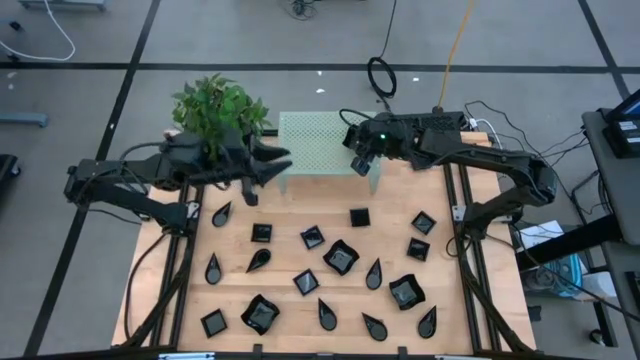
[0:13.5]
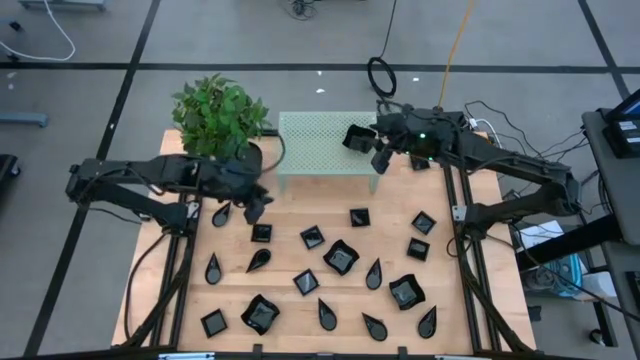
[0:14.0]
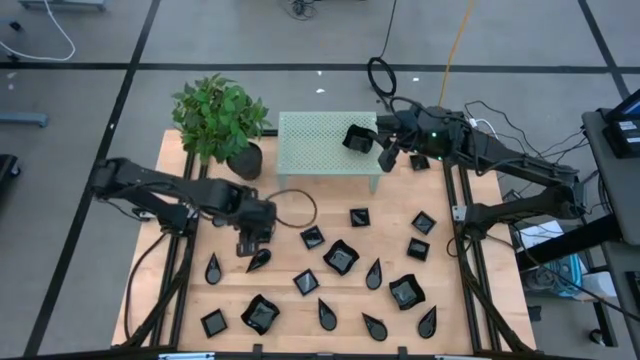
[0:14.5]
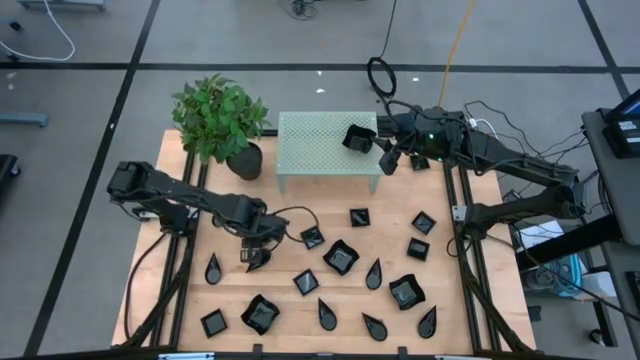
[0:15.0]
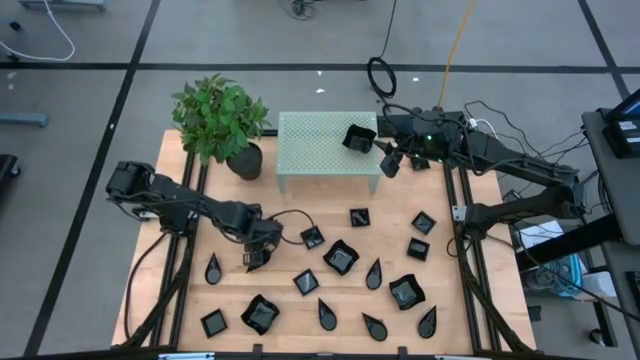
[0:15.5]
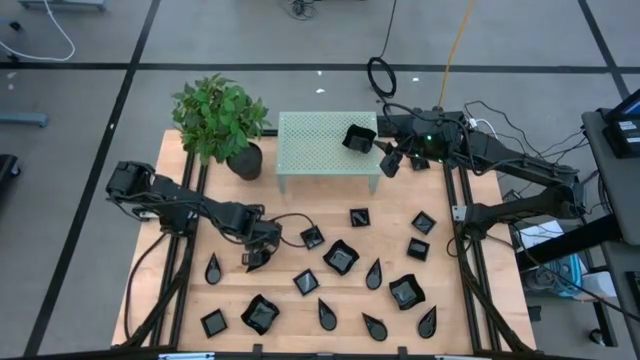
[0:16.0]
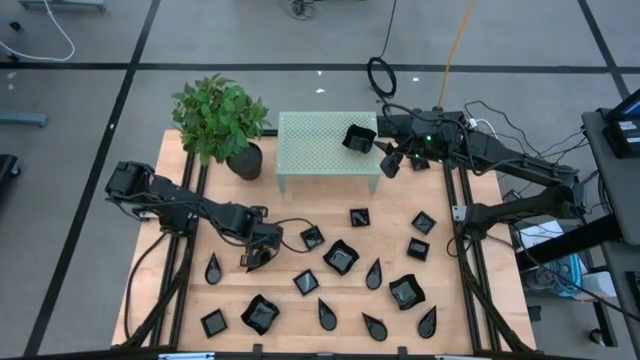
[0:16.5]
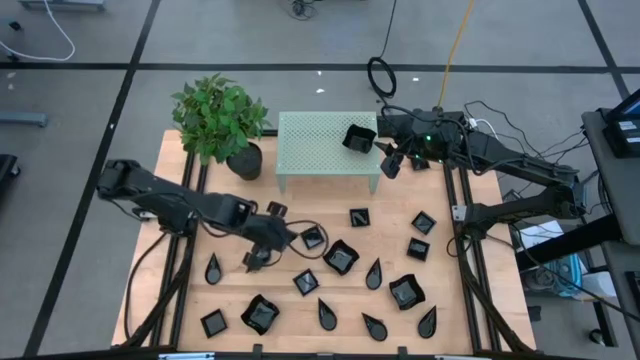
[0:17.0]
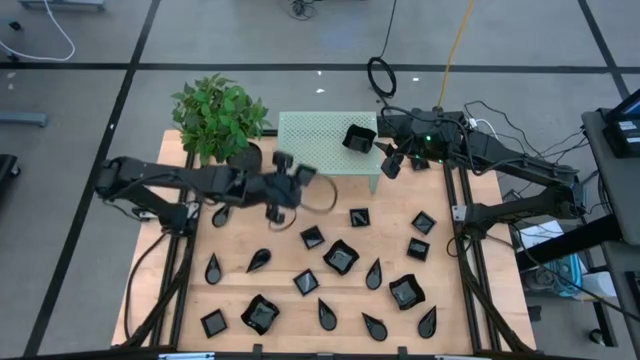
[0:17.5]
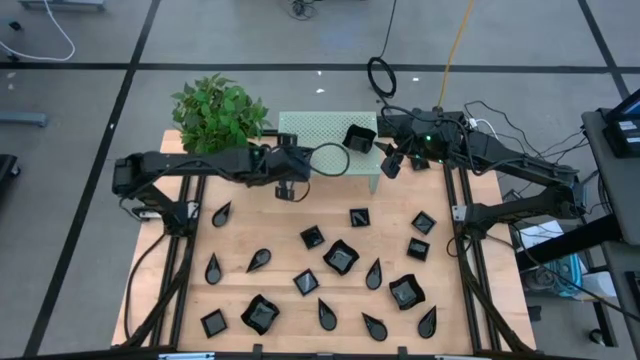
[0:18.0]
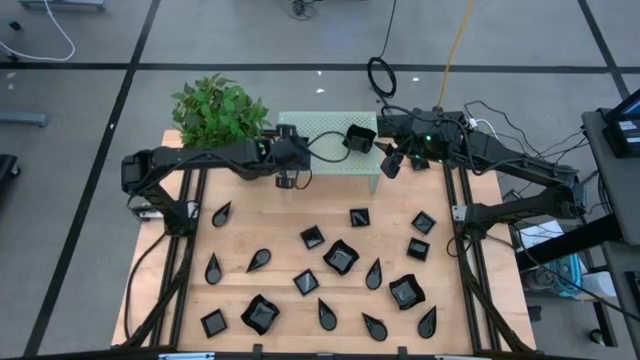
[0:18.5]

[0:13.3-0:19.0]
Task: Pick & Place Mini shaped plates
Put the square plate on the shelf

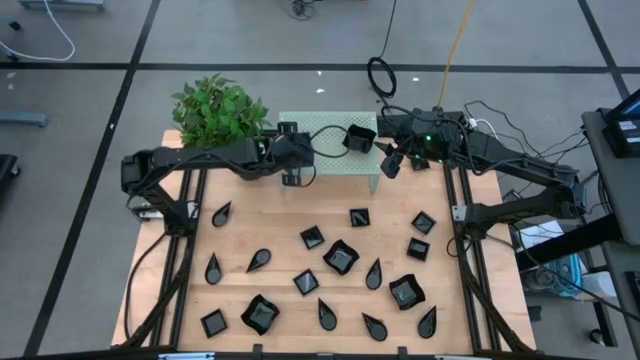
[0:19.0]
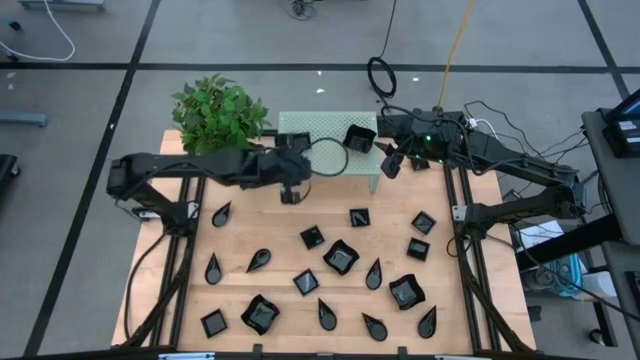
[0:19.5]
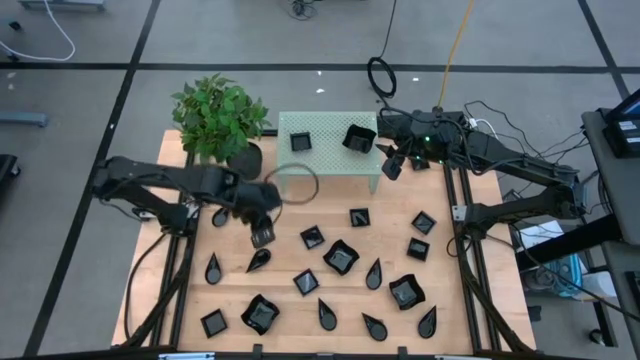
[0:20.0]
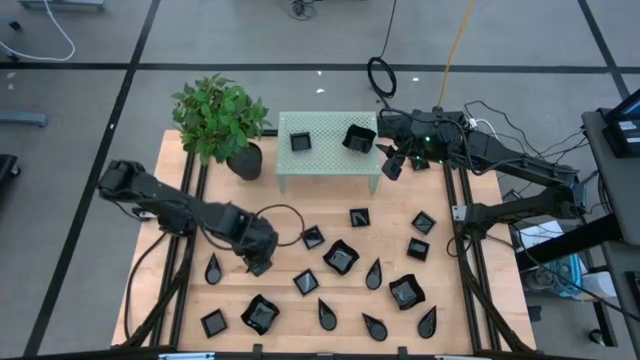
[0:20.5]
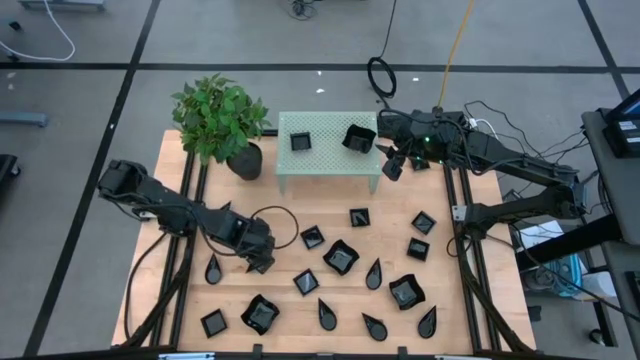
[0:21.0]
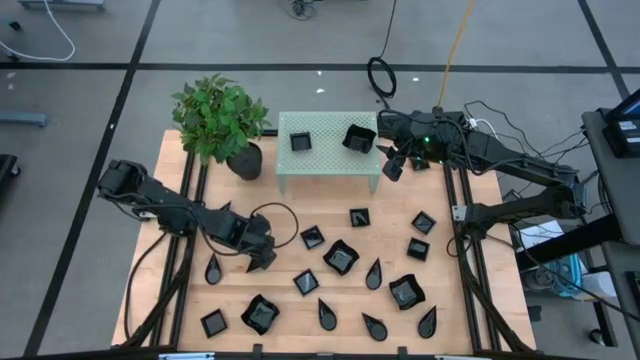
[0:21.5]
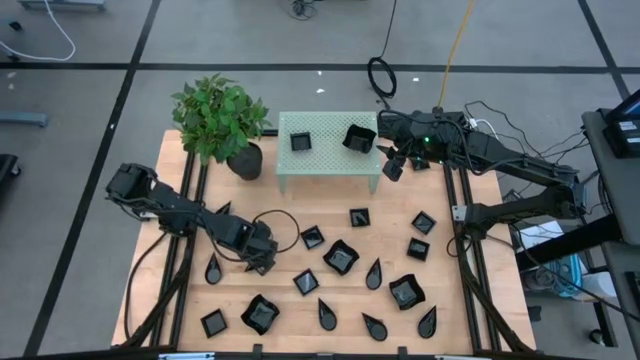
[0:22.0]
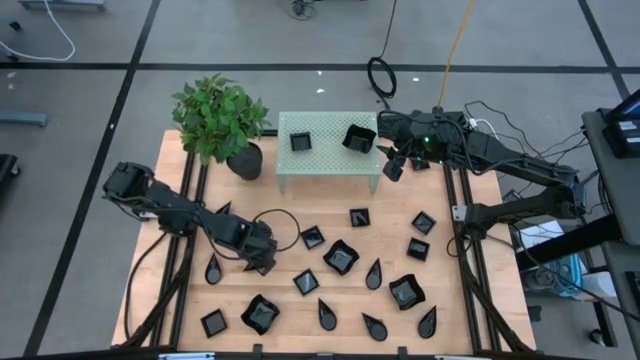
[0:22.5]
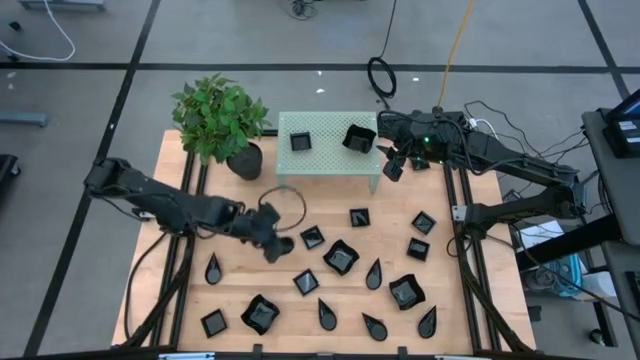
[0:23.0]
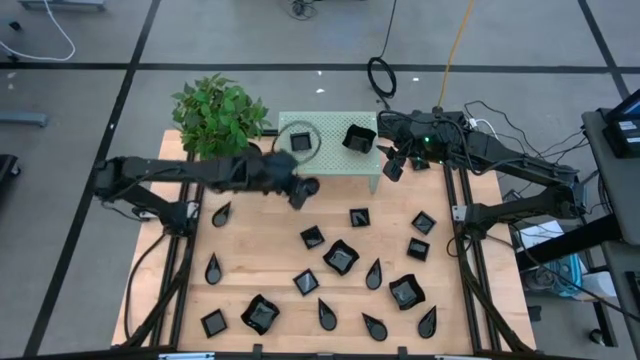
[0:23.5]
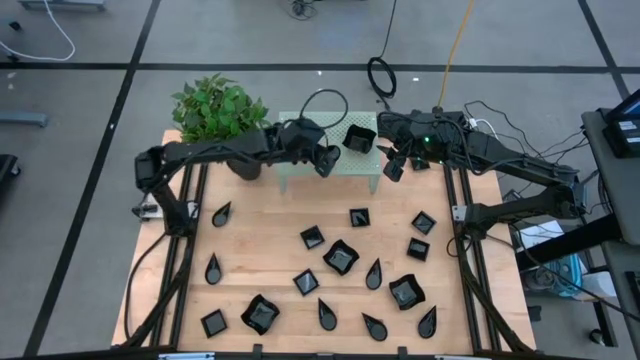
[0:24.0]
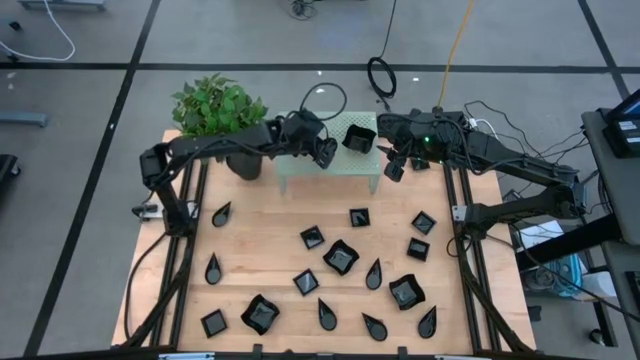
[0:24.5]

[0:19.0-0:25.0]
Put the drop shaped plate on the shelf

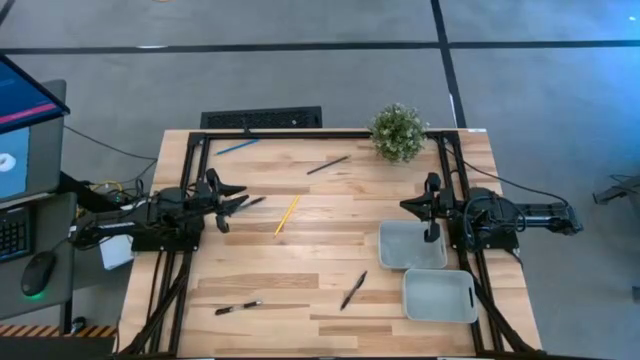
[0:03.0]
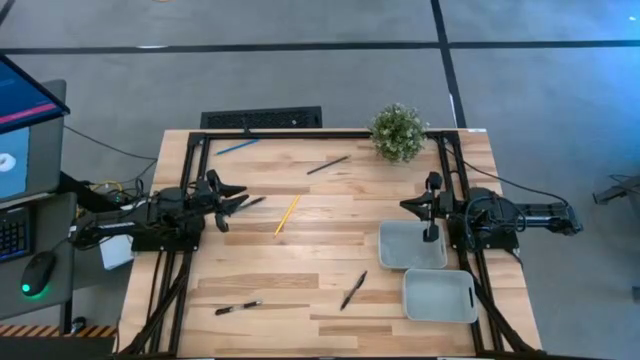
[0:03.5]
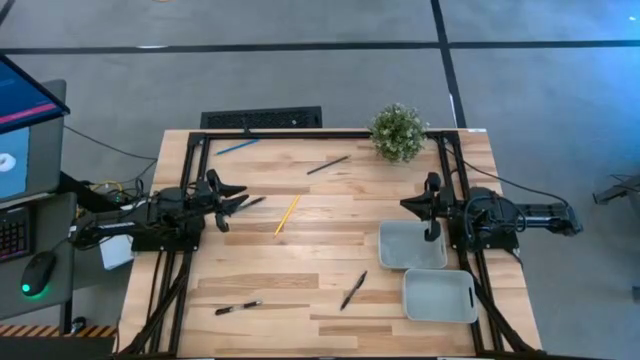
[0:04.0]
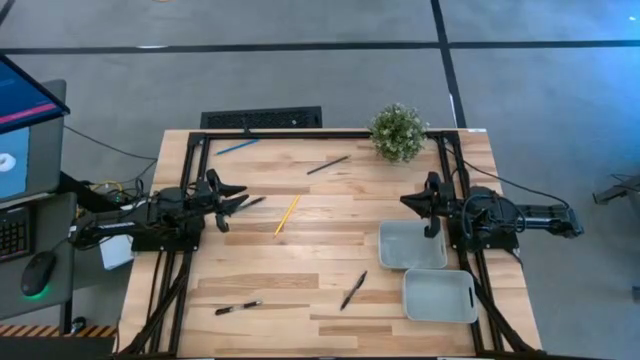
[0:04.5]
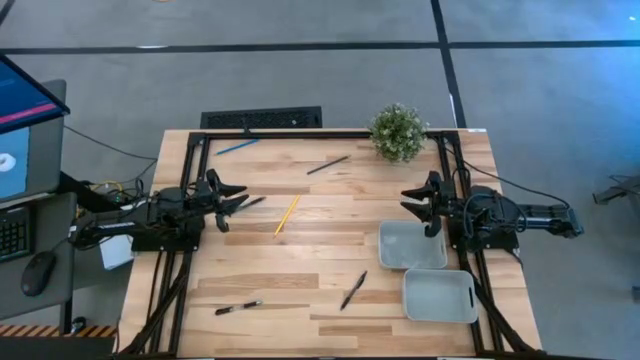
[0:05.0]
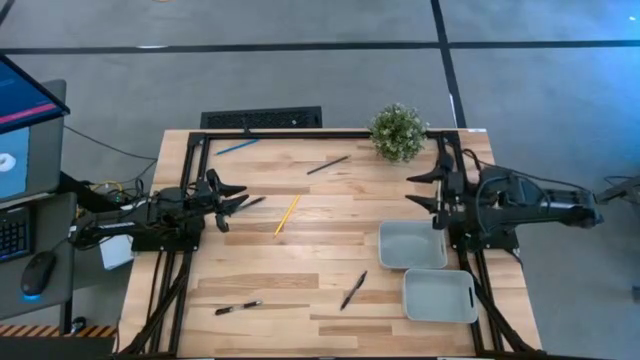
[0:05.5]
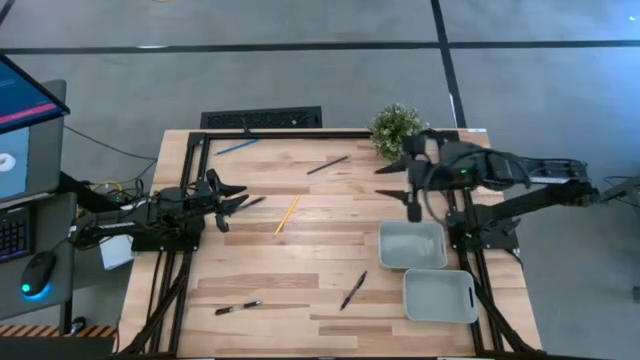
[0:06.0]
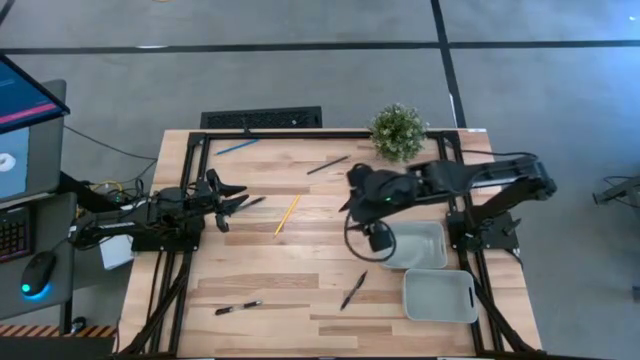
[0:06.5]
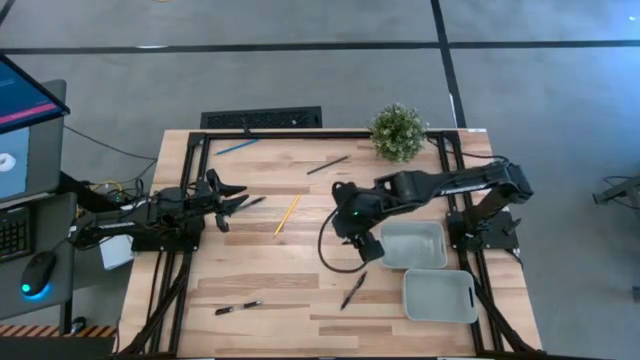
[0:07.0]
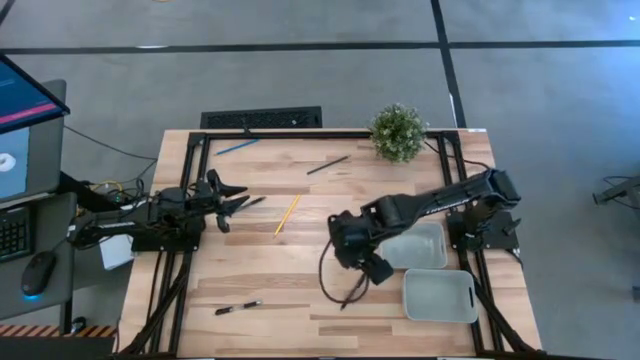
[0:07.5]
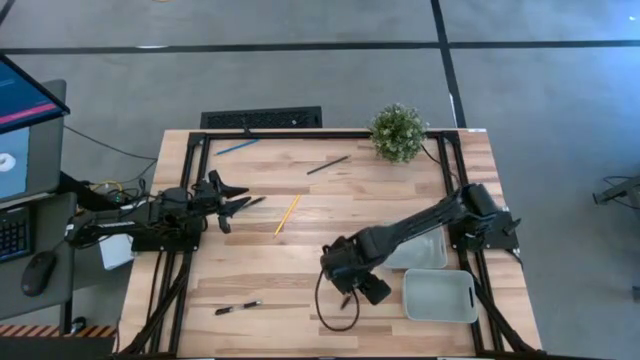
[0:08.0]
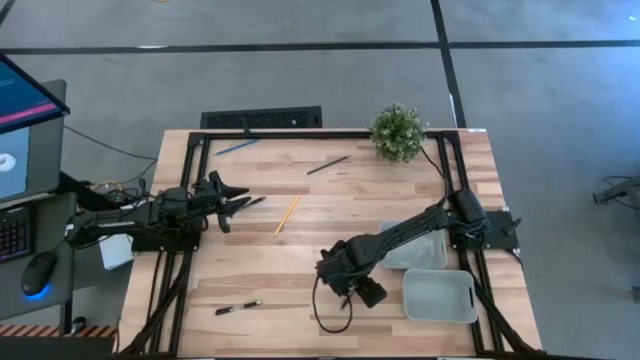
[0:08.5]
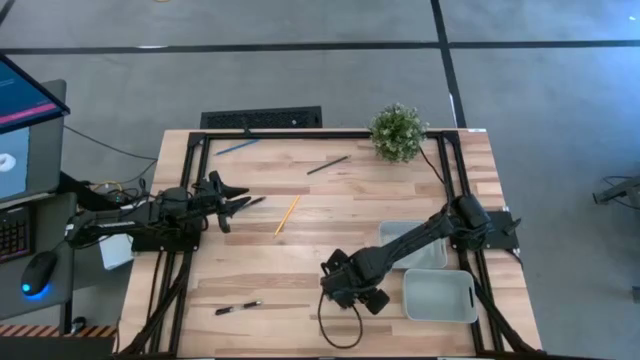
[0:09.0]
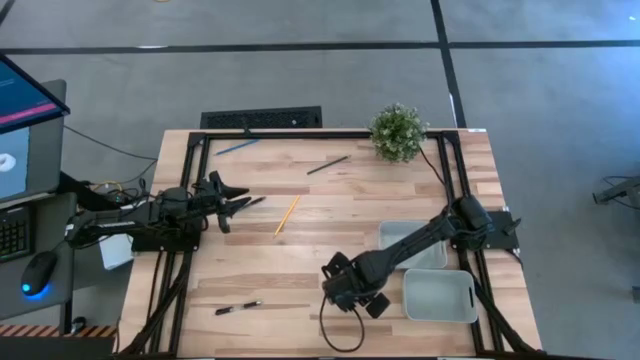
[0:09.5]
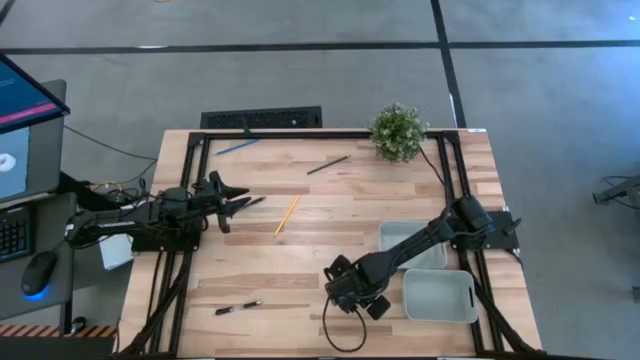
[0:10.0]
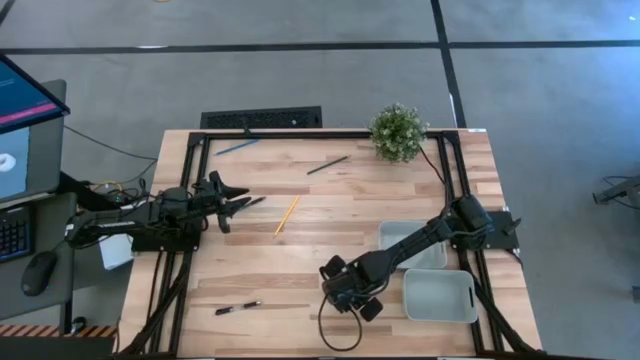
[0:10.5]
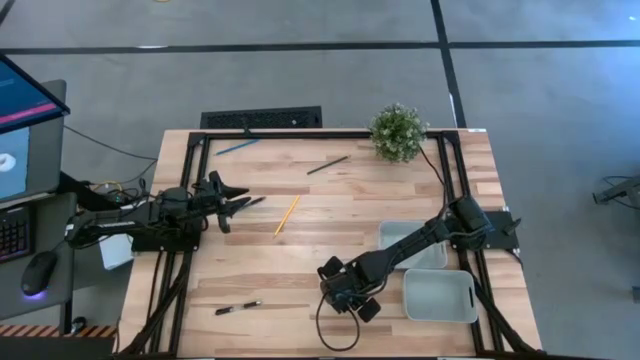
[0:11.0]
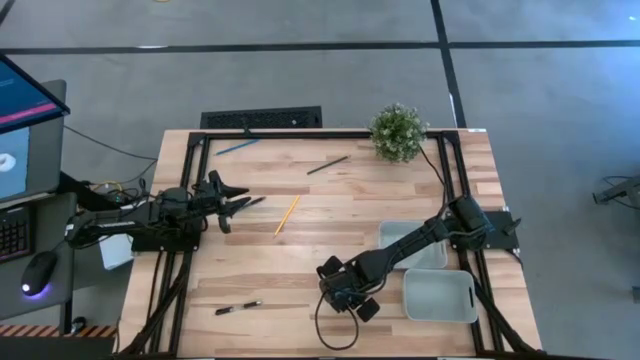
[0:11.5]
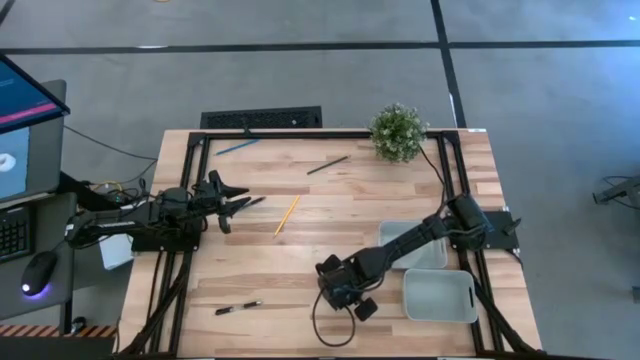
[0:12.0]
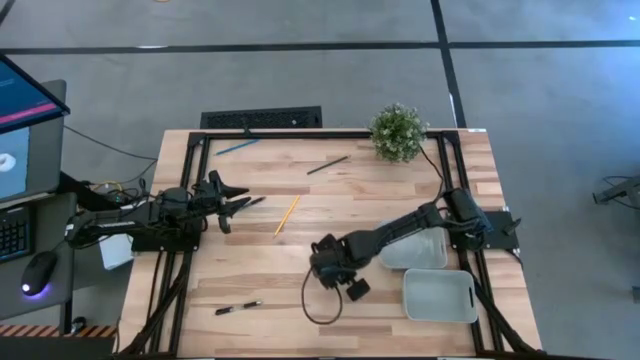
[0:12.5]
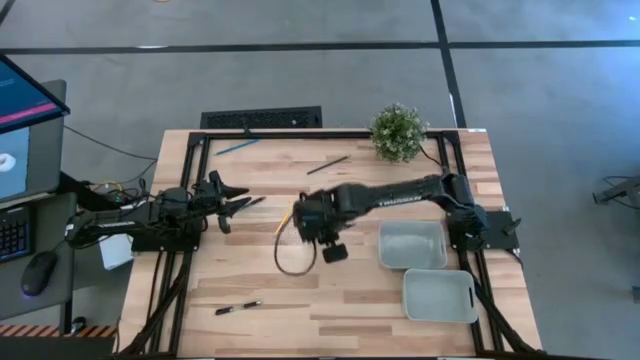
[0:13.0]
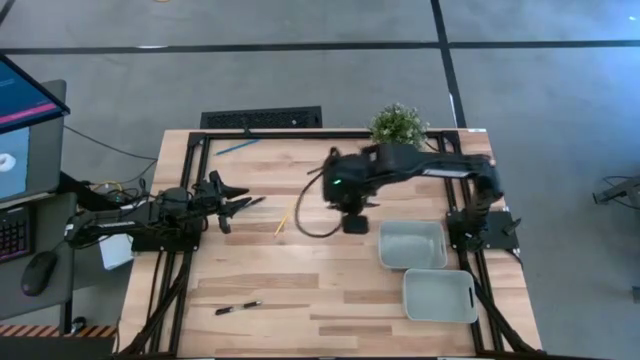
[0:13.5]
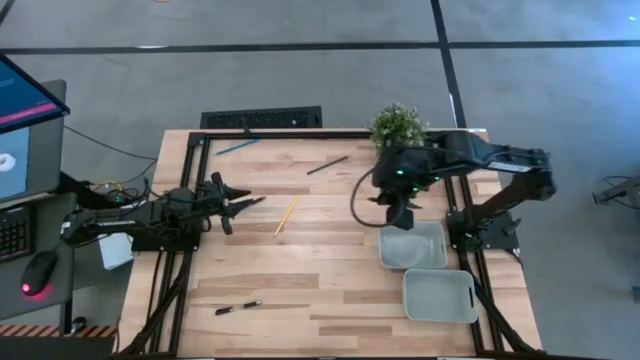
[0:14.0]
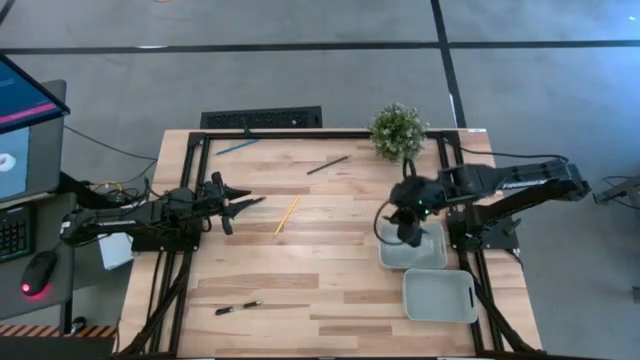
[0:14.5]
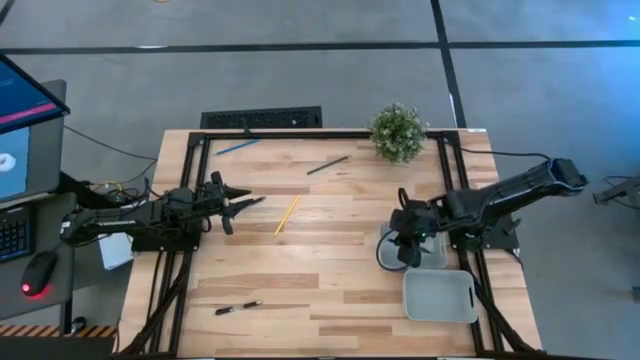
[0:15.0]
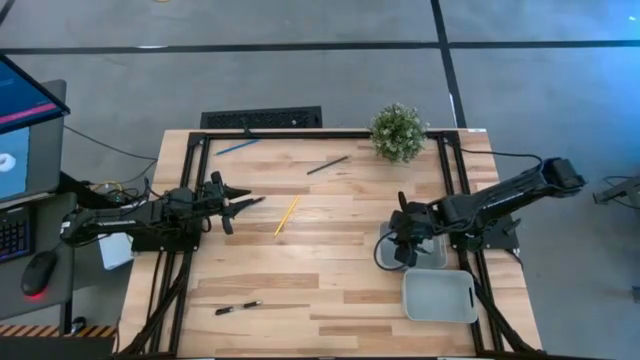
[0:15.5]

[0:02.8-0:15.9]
Task: Sort pens & pencils
Put the bottom right black pen into the top gray bin
